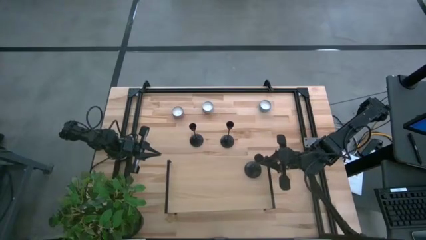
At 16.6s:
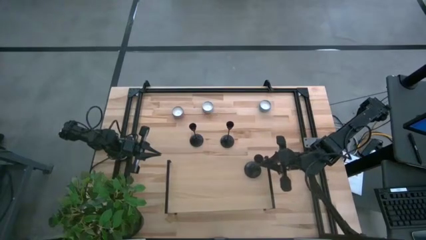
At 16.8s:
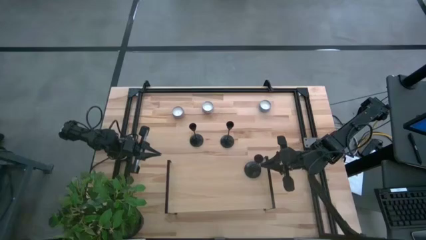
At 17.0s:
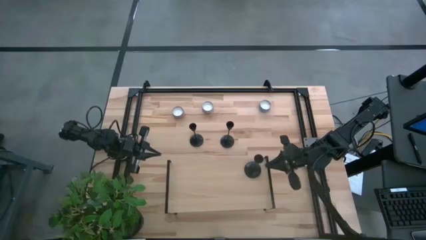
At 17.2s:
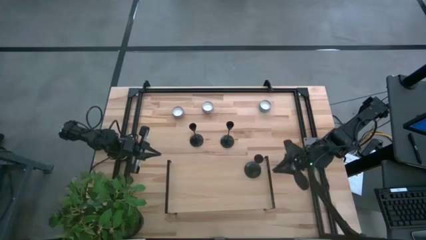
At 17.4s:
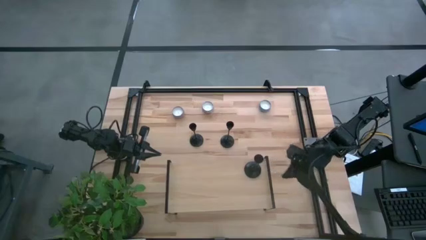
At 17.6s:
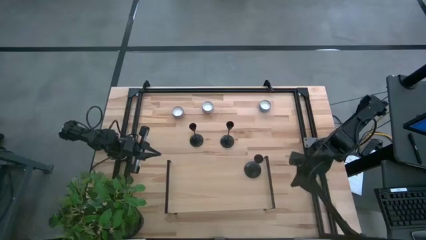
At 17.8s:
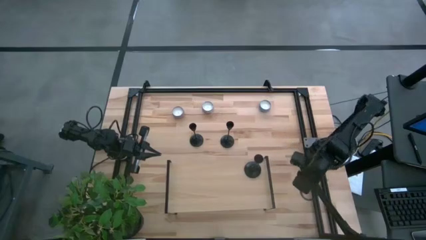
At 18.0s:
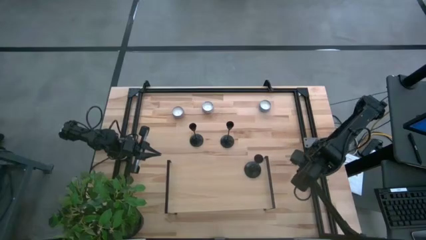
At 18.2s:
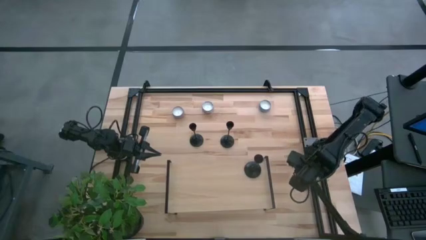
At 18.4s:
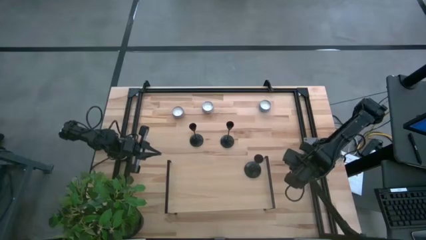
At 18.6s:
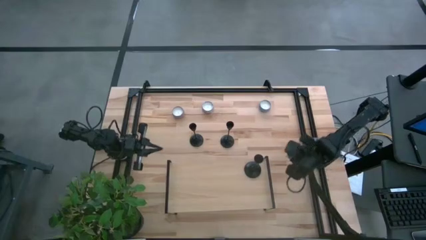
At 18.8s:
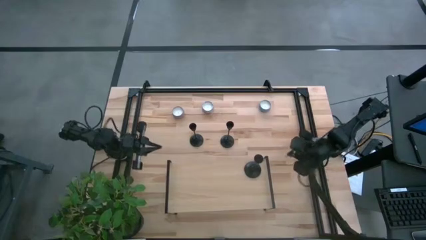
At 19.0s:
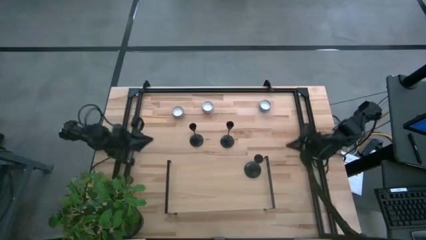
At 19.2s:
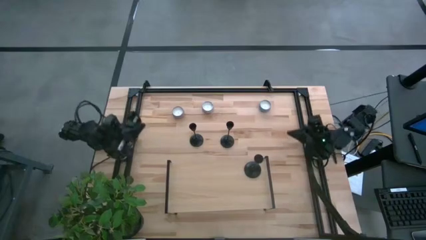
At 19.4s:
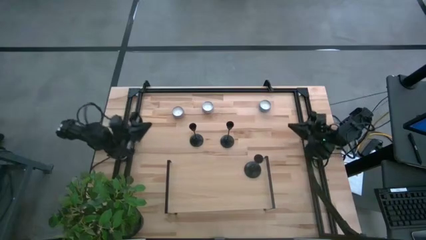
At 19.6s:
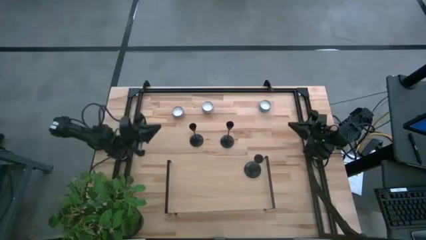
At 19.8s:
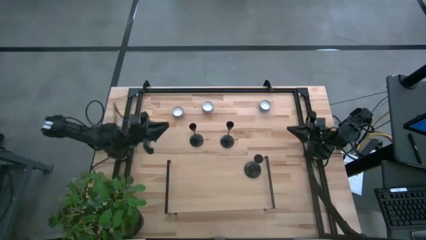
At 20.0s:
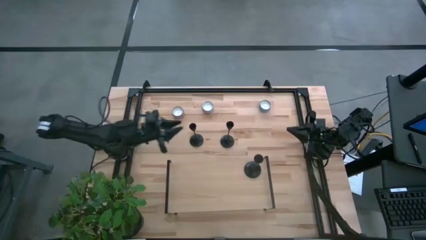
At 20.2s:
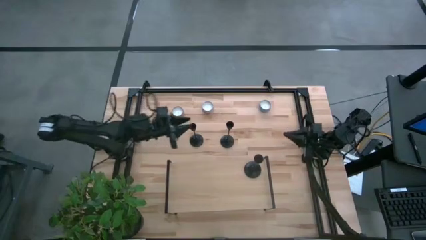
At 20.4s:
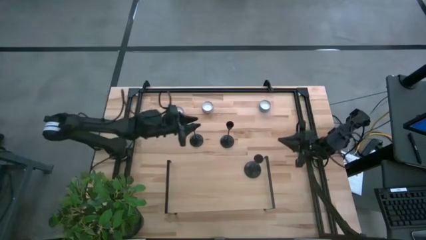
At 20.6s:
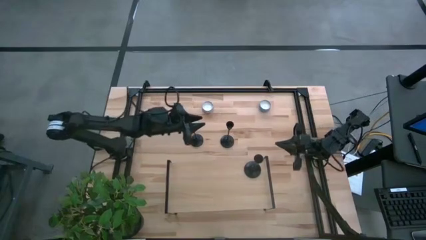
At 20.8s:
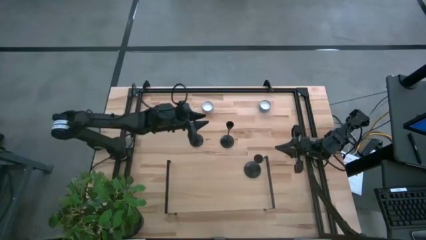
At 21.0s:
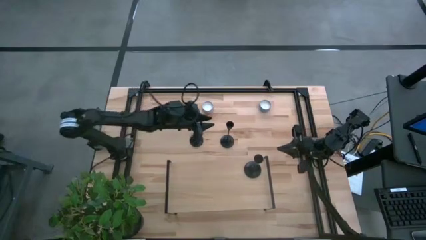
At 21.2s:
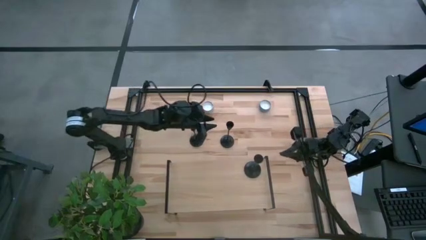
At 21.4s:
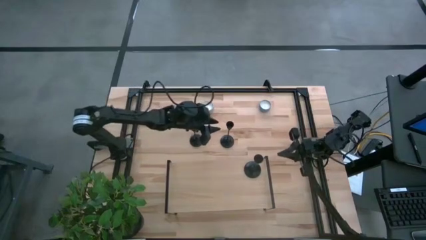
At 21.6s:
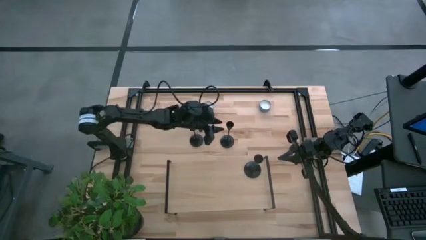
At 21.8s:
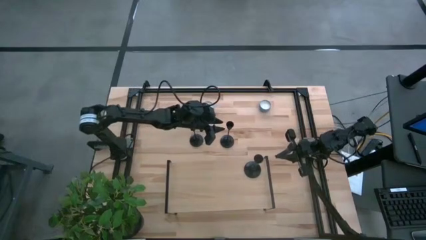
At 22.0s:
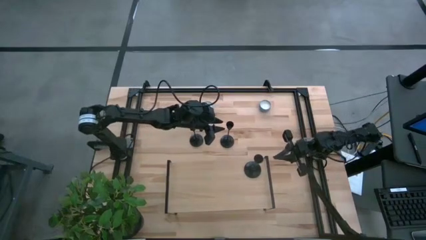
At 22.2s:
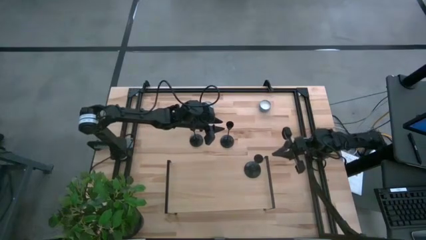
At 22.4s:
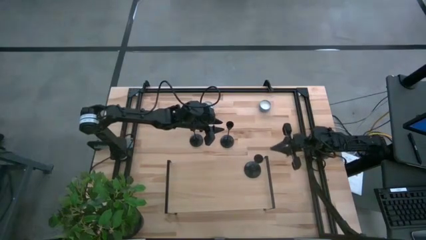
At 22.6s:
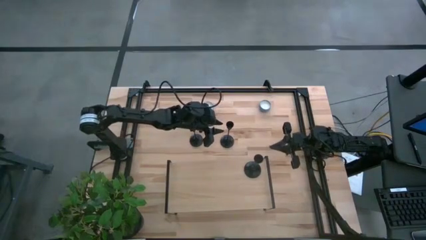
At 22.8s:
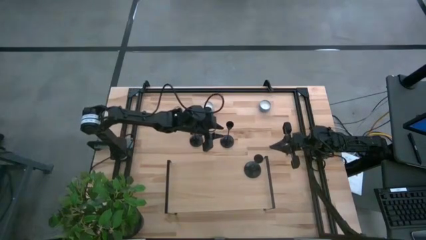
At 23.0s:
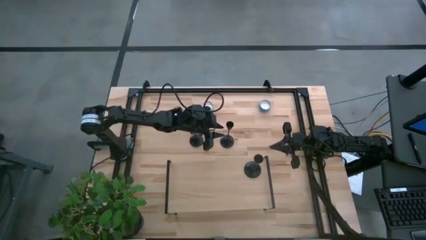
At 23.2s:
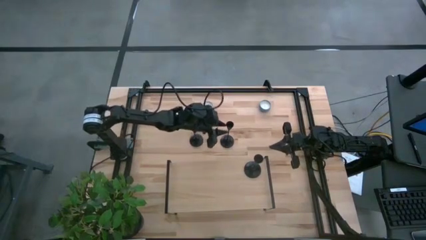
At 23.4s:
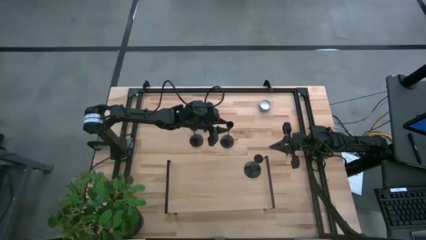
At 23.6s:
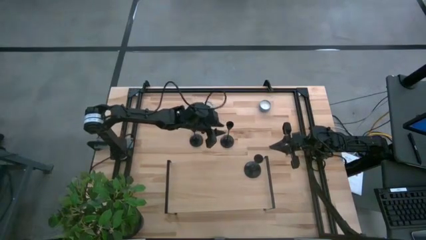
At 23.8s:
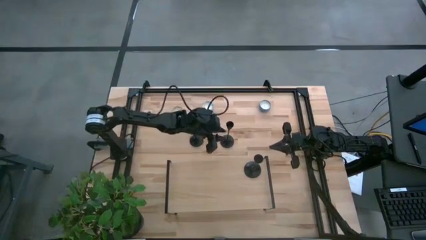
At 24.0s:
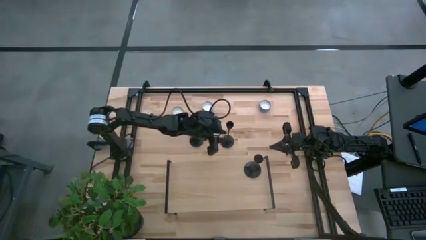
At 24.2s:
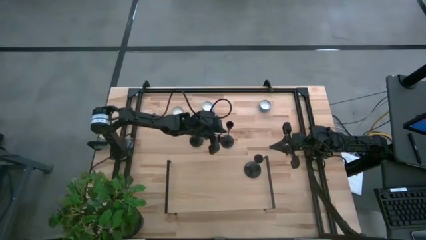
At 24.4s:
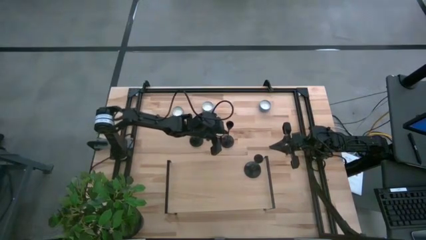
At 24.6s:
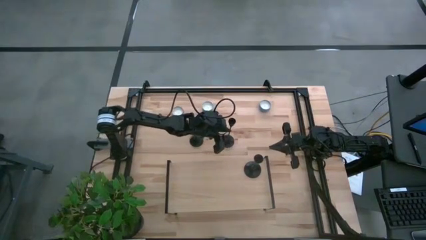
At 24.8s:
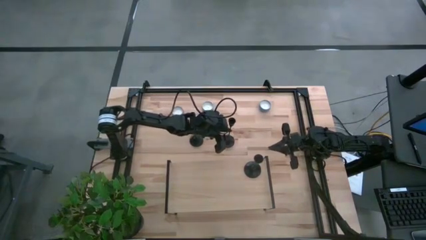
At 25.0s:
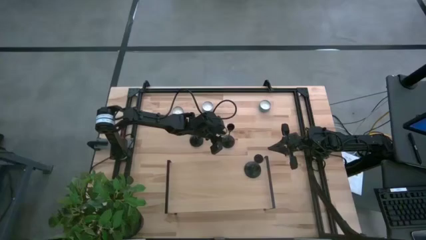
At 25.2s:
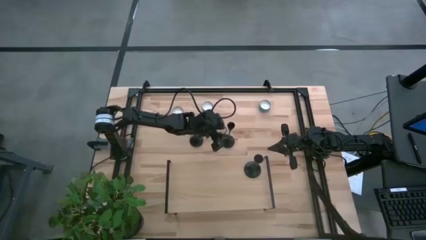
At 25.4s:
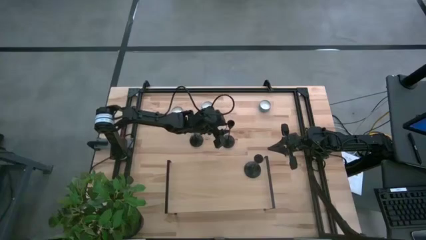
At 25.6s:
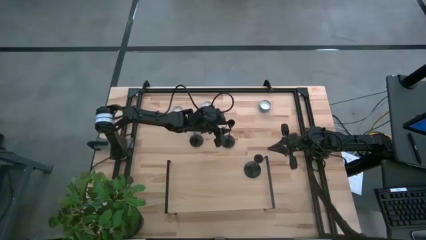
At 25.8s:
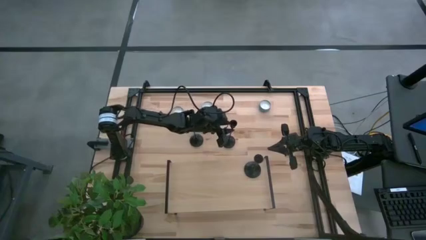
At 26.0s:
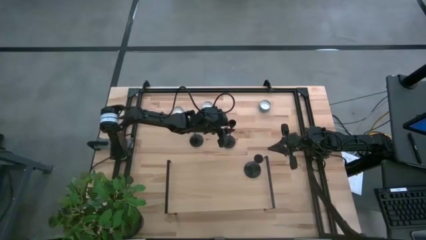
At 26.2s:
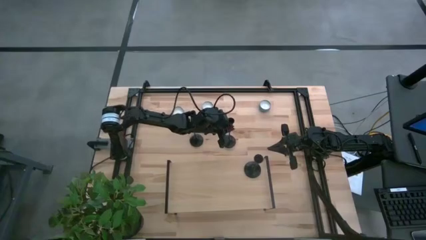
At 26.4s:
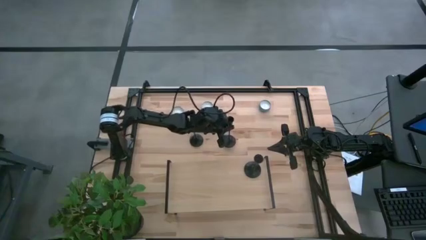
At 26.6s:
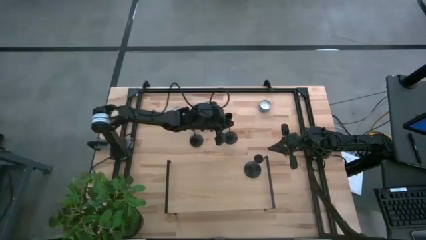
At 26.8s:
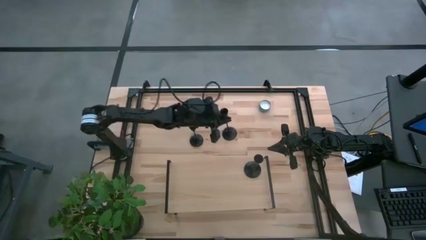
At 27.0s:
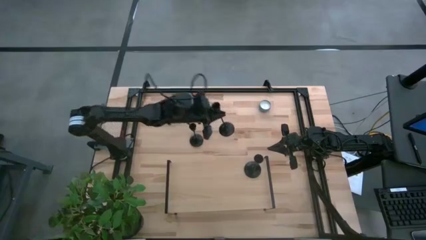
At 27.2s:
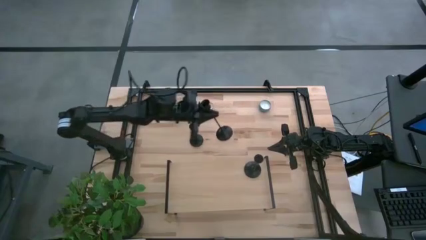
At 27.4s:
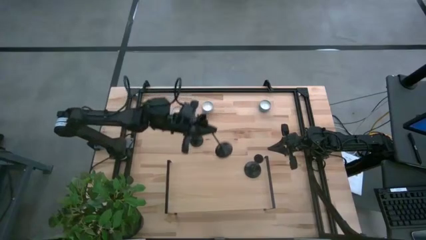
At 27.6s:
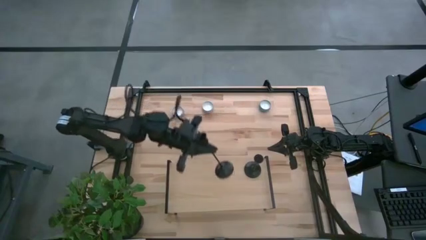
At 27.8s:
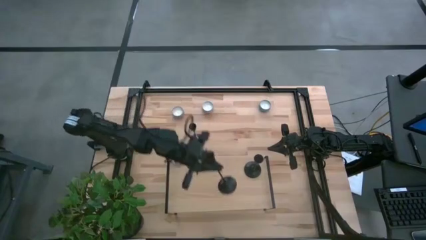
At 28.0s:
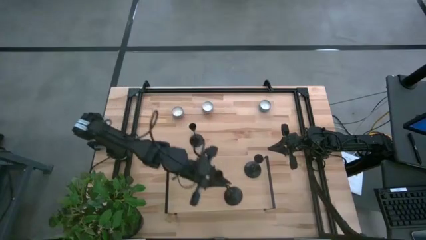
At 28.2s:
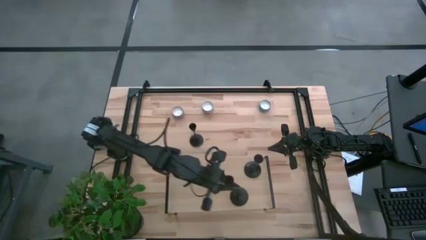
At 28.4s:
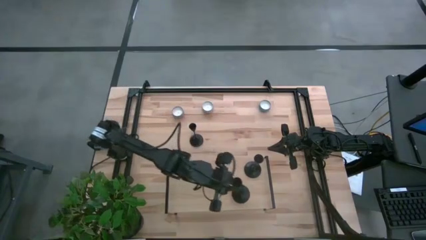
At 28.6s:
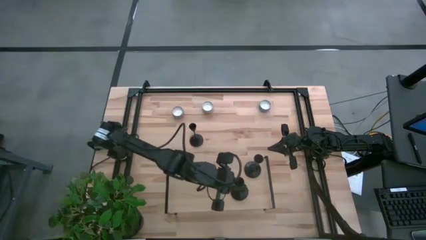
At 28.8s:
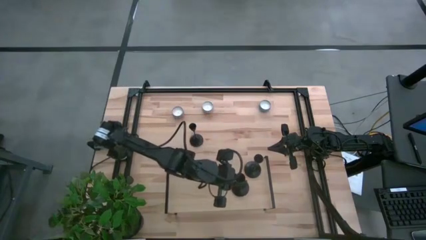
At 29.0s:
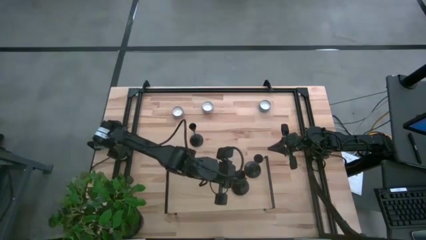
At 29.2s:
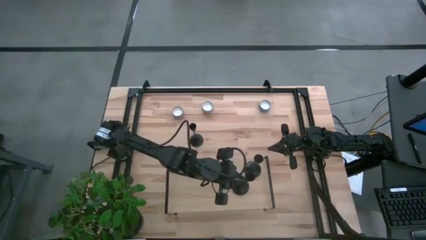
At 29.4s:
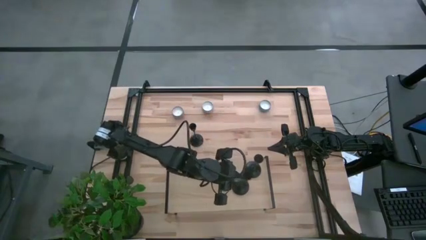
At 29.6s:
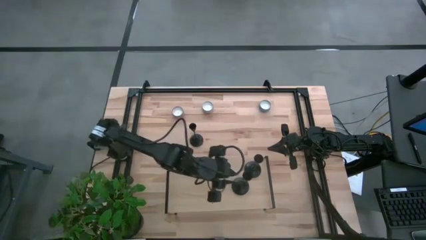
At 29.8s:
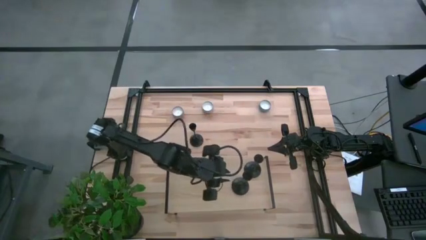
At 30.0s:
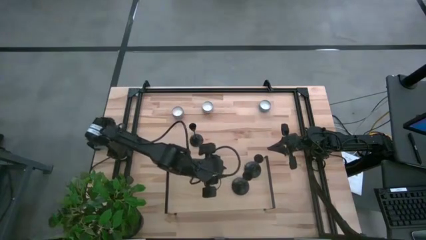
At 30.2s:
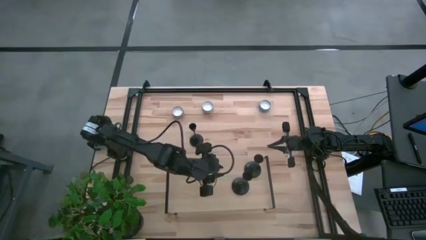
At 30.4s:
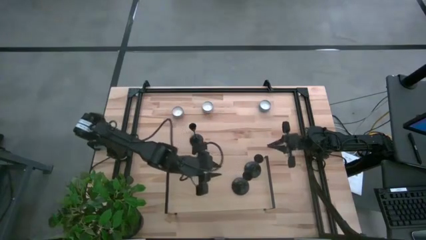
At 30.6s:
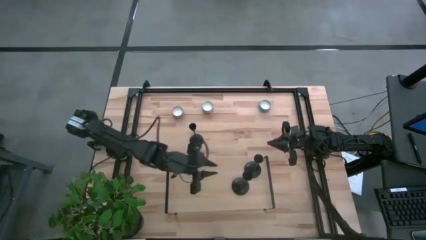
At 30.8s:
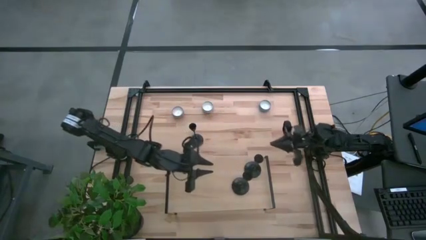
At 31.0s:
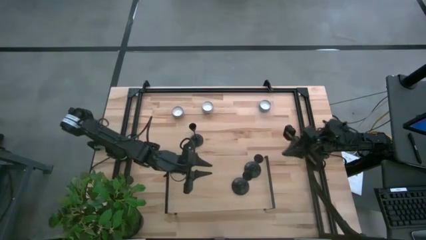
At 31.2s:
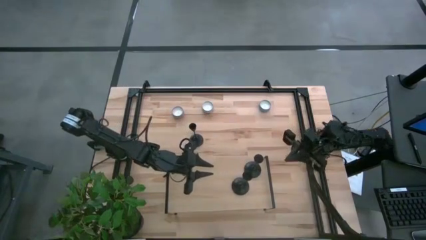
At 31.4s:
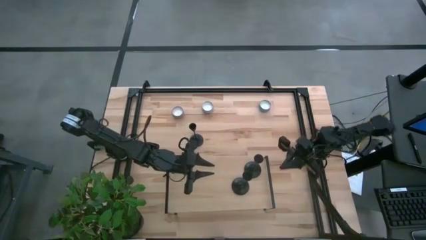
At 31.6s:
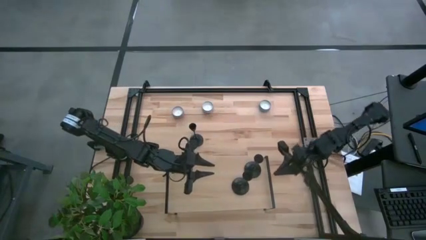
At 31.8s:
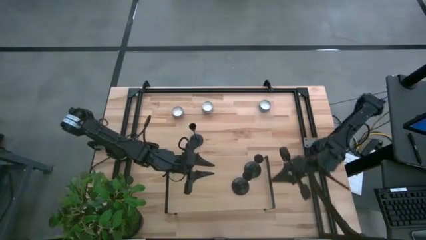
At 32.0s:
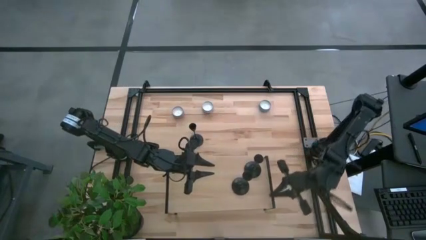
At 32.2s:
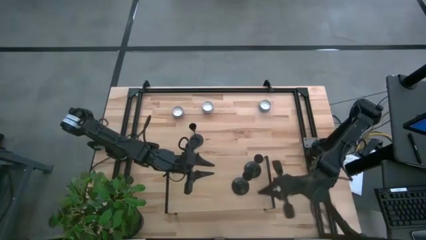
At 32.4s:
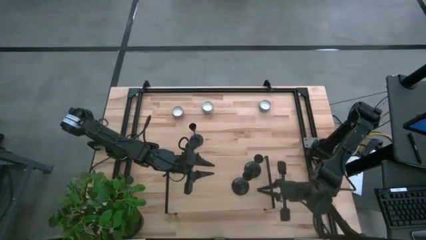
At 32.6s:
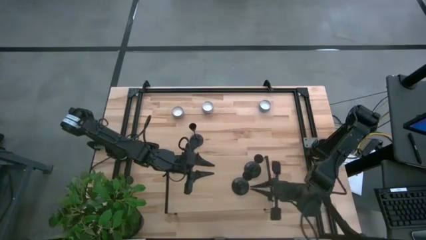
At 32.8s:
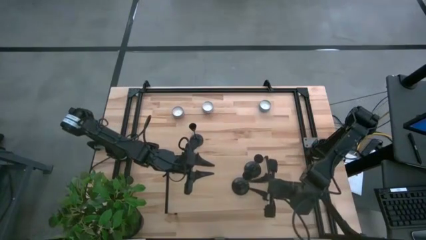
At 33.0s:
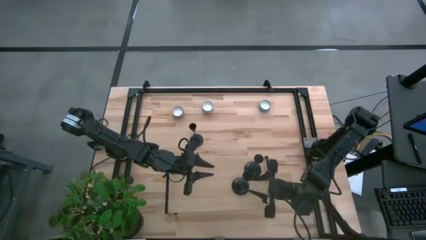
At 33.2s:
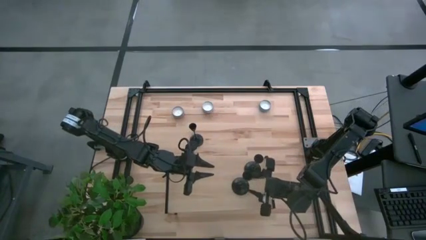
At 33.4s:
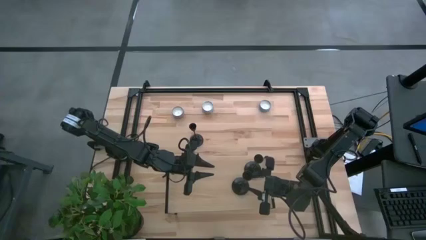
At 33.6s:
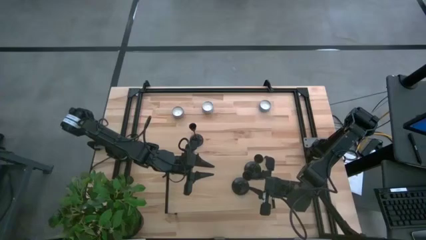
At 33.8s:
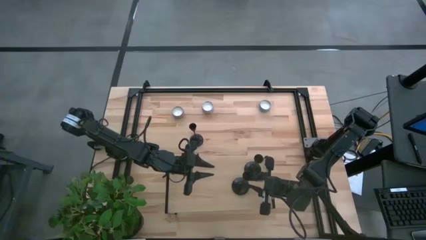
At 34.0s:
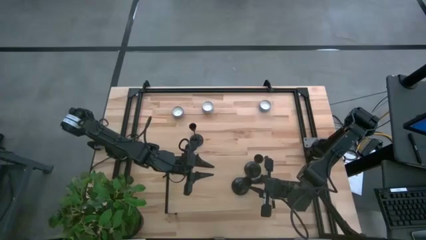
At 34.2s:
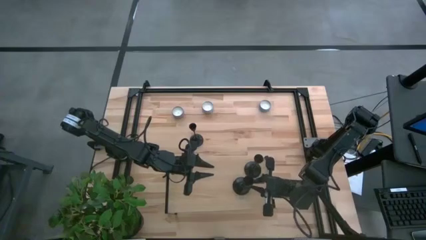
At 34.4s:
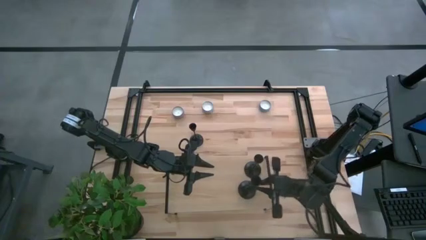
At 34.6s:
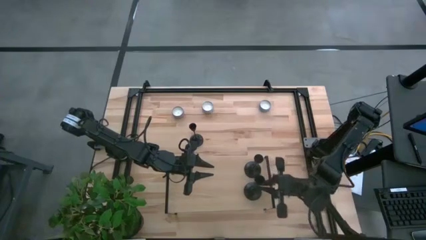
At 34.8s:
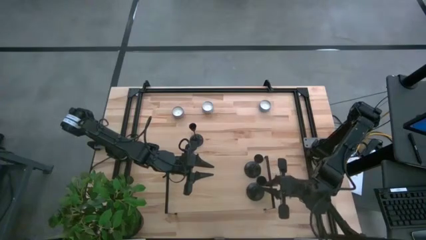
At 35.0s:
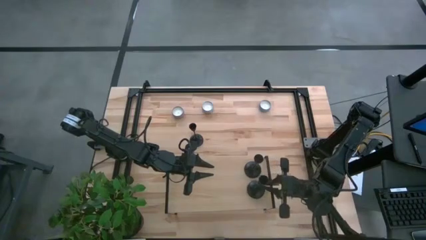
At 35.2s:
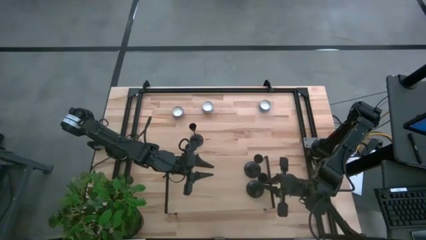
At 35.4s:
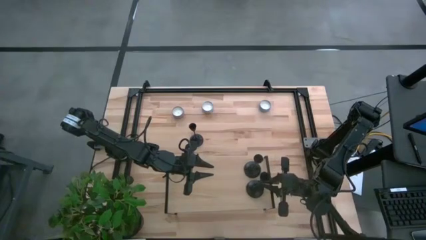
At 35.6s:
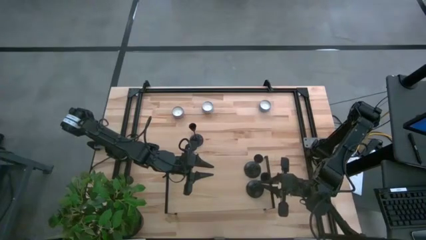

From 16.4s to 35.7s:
Task: Pick & Place candle stick holders
Put the right candle holder on the shelf
